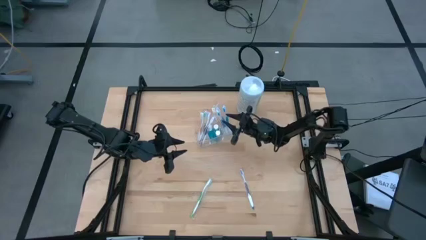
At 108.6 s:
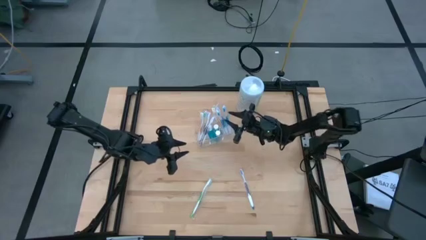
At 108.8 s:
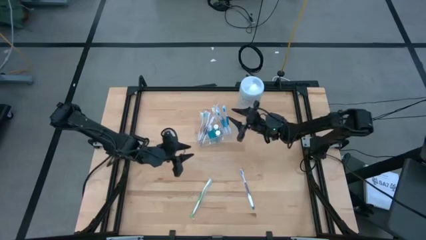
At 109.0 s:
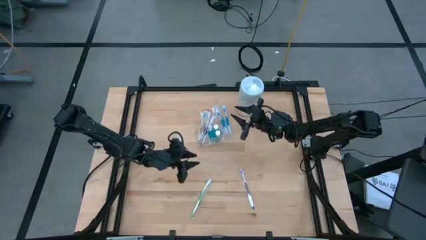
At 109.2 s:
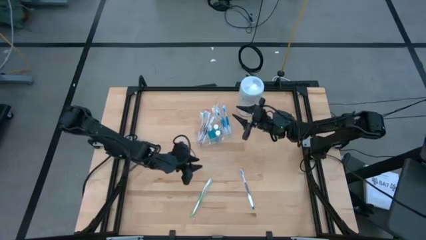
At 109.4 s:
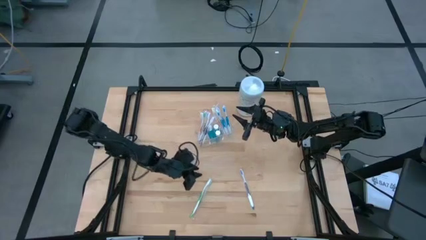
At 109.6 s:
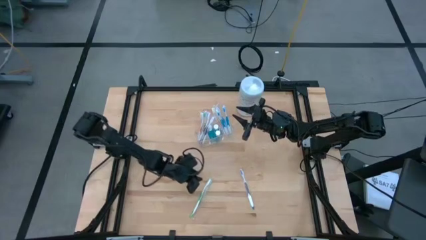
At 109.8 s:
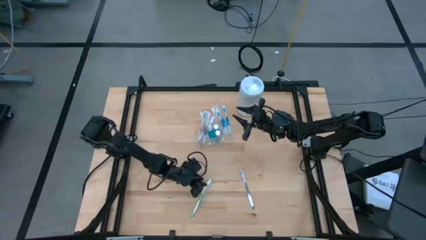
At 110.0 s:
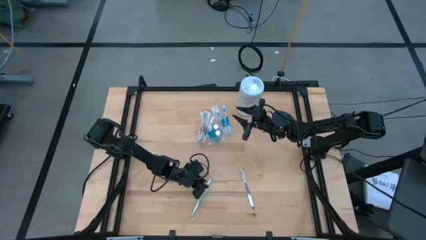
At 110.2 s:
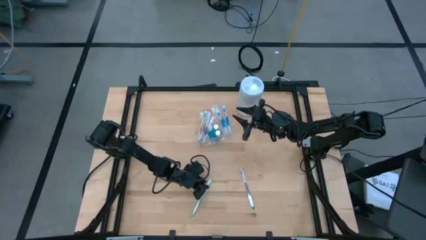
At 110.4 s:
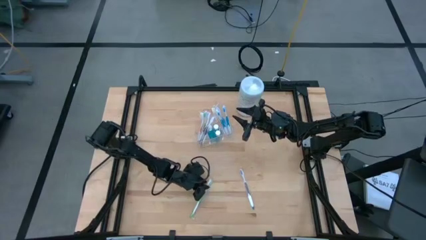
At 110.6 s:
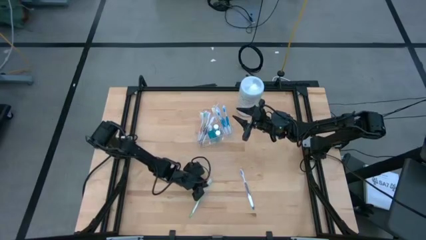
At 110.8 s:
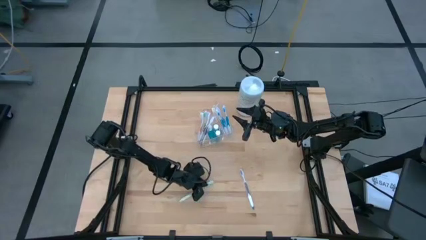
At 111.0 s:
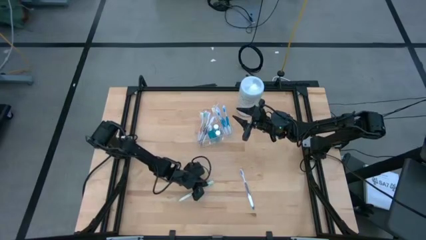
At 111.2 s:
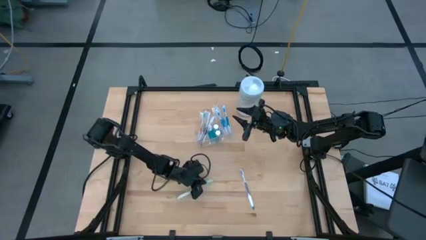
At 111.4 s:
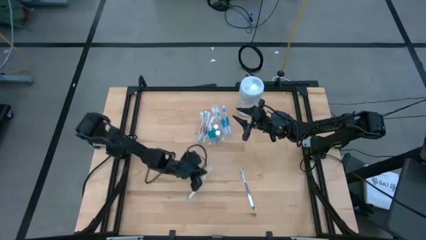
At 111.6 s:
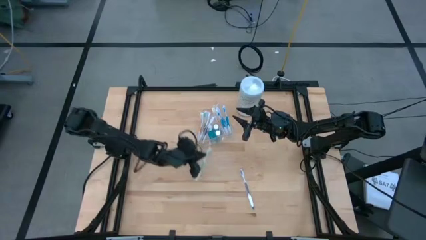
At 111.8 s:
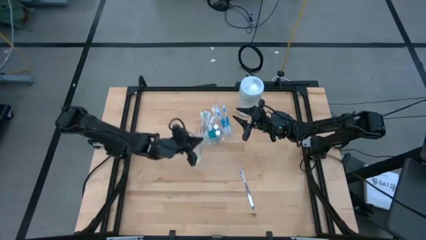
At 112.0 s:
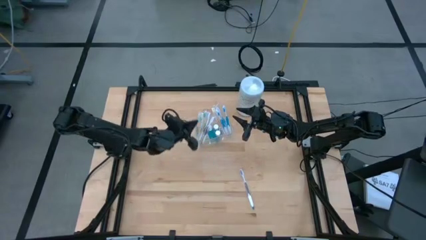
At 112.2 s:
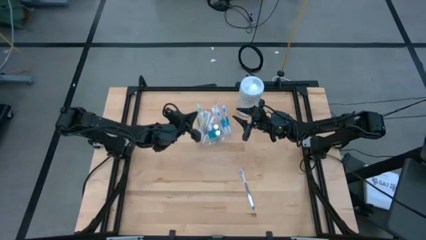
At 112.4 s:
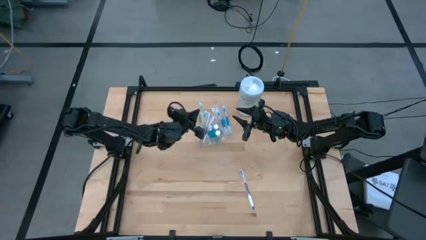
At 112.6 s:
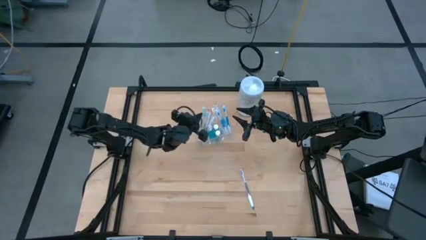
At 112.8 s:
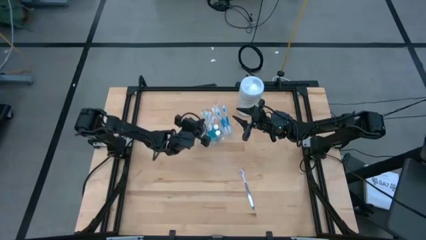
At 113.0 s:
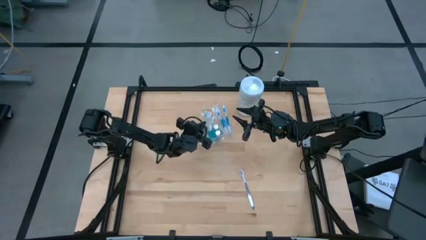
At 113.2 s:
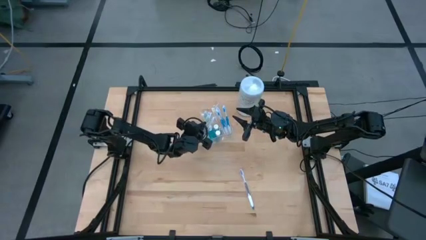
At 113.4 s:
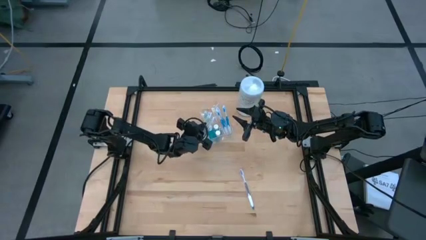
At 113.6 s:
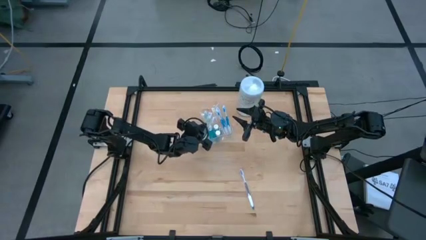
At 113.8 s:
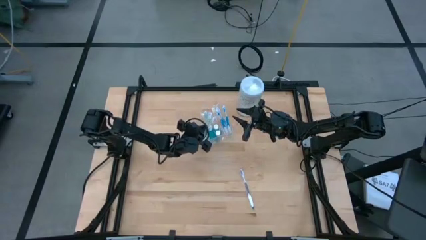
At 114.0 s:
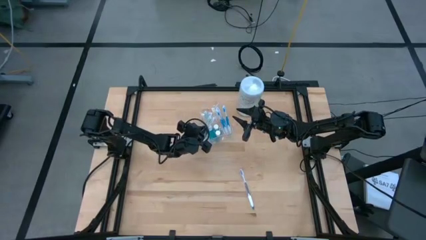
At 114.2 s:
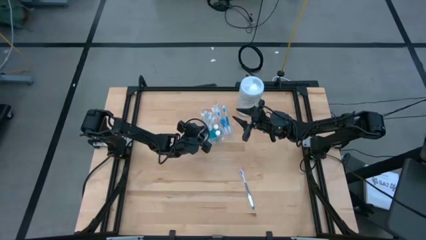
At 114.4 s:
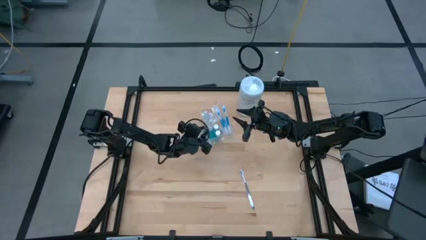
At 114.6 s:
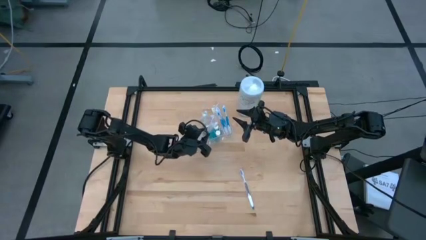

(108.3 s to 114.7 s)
Task: Pick & Place toothbrushing station
Put the green toothbrush into the transparent organizer

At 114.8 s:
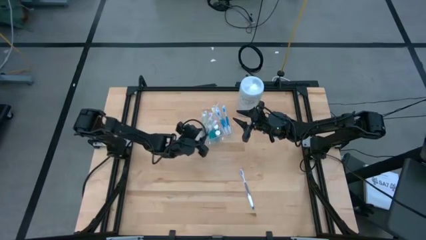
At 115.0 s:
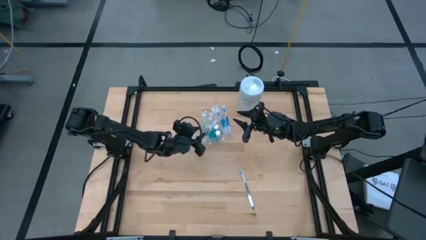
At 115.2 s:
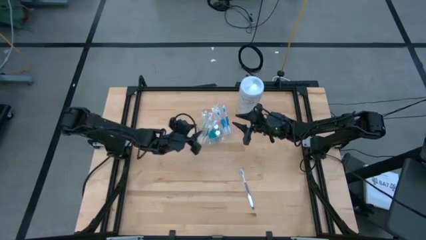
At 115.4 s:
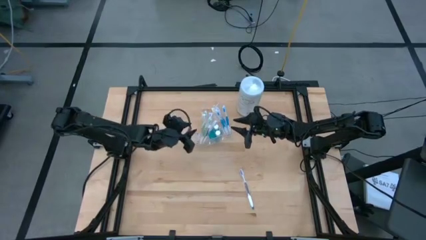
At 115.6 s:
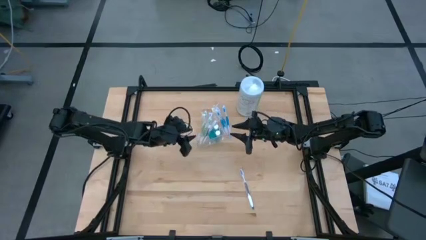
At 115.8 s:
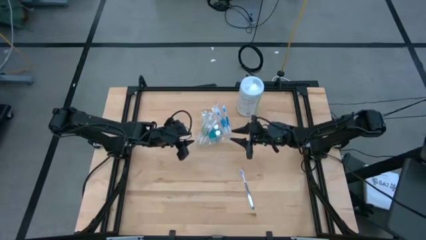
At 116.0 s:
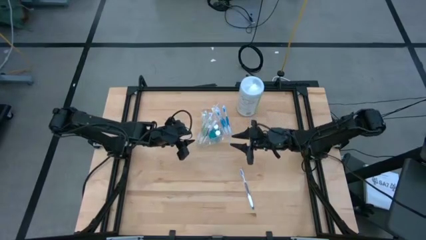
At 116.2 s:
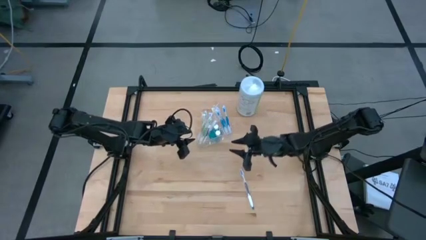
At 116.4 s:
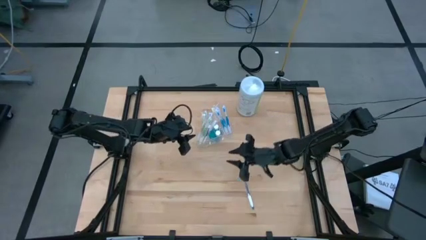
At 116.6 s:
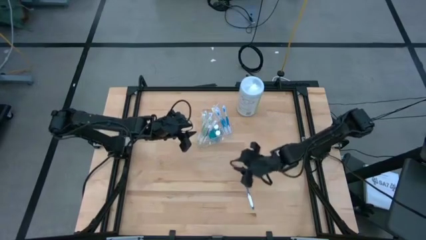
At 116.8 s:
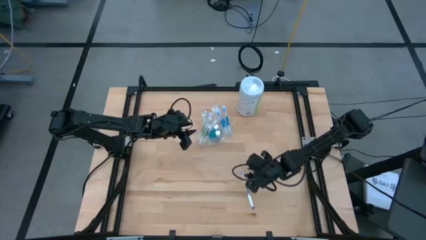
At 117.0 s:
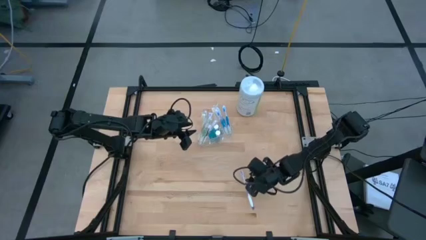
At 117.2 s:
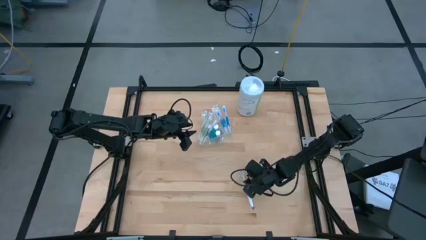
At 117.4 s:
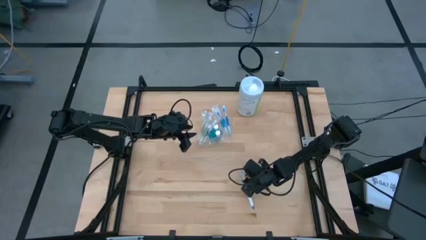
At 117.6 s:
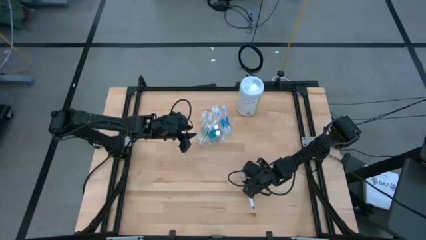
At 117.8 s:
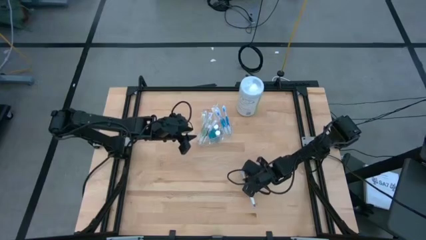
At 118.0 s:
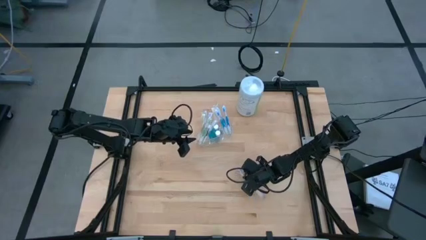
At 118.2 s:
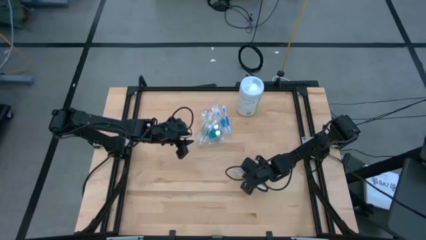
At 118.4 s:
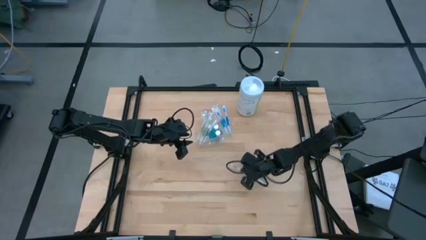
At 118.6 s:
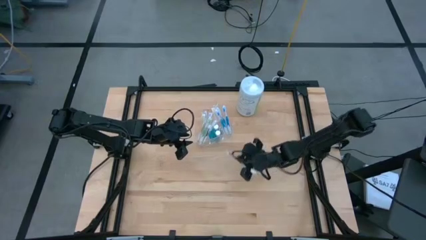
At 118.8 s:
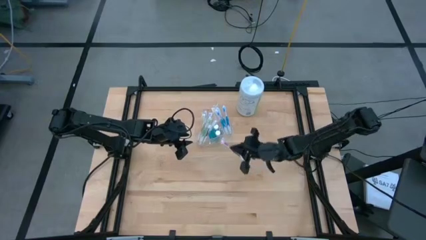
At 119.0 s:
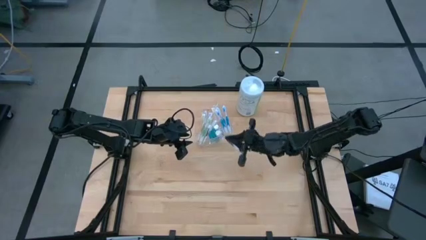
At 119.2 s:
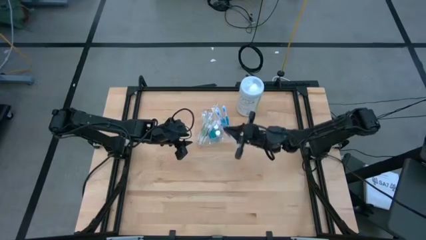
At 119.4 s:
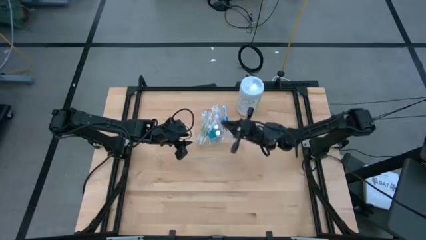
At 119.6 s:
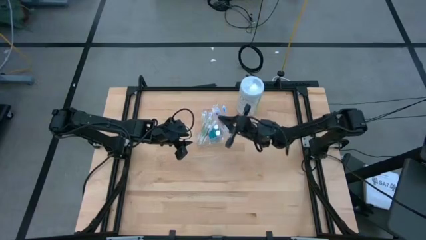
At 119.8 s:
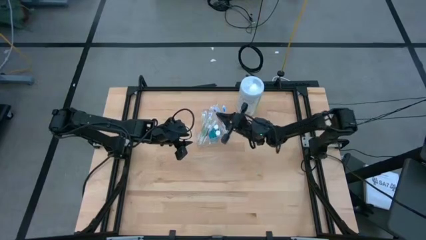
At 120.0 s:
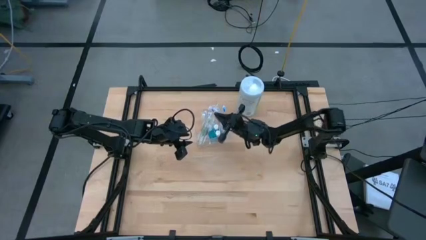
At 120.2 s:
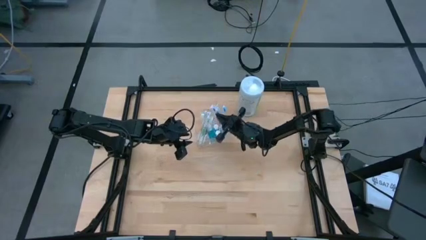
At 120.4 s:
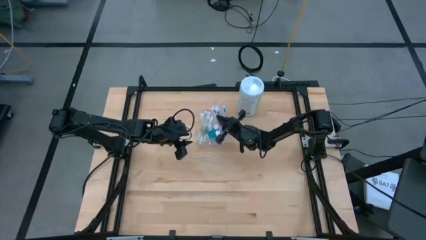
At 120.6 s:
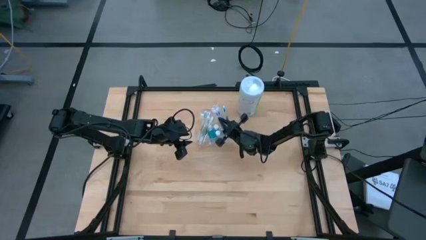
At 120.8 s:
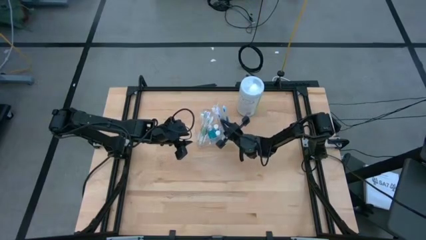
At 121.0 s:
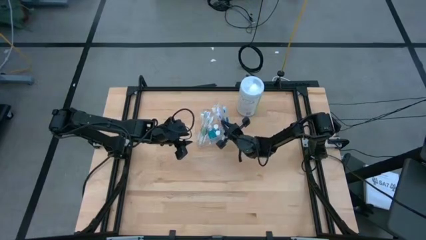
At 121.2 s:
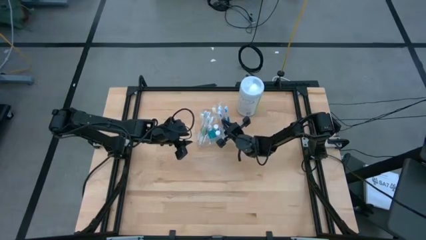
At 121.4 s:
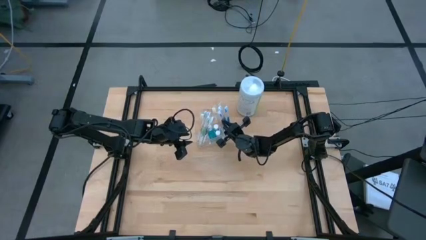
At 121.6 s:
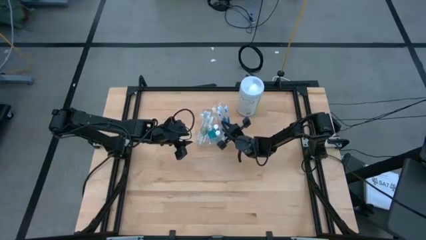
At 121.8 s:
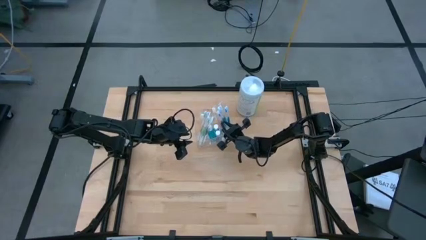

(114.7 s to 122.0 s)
Put the purple toothbrush into the transparent organizer

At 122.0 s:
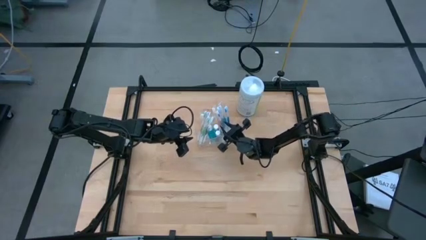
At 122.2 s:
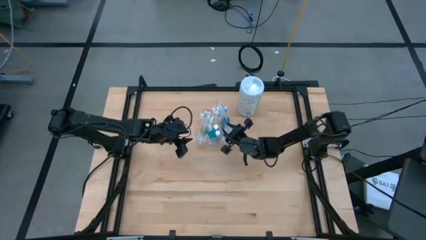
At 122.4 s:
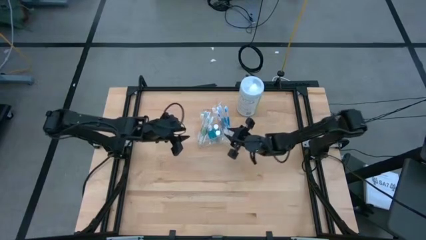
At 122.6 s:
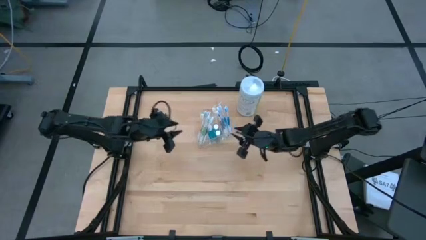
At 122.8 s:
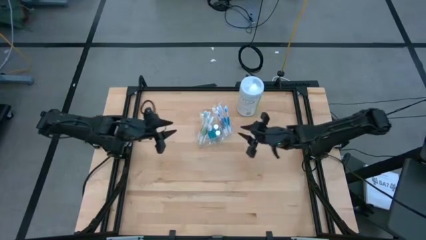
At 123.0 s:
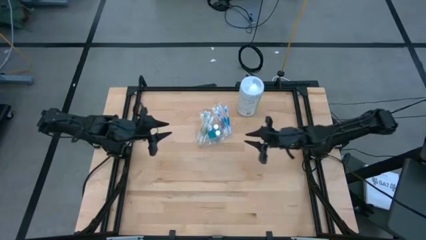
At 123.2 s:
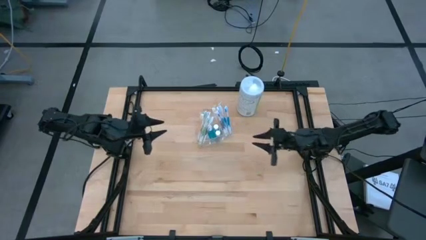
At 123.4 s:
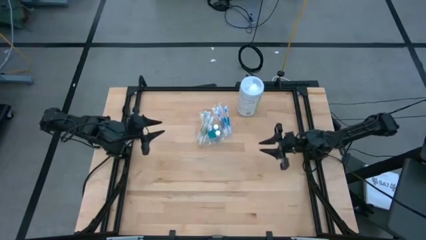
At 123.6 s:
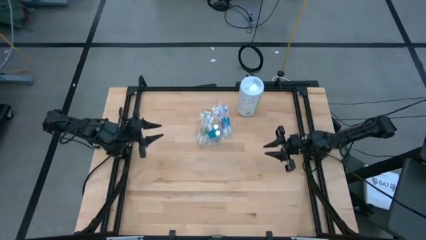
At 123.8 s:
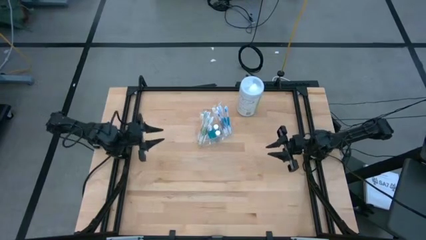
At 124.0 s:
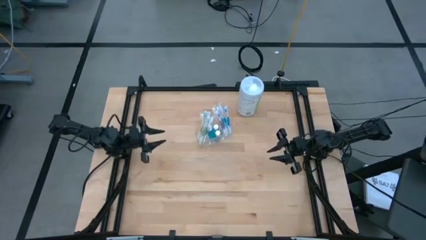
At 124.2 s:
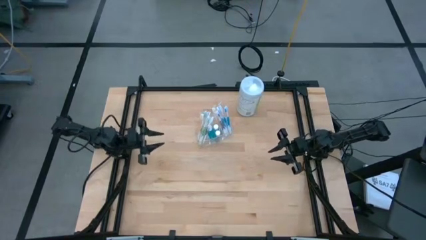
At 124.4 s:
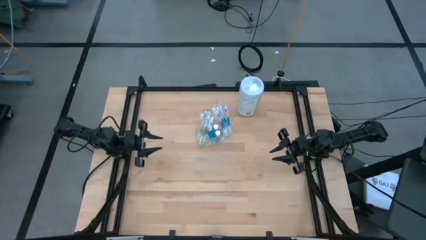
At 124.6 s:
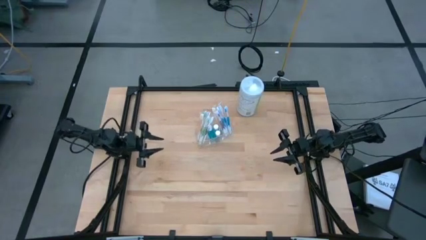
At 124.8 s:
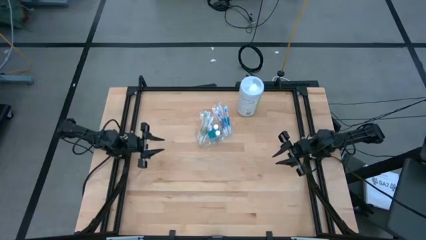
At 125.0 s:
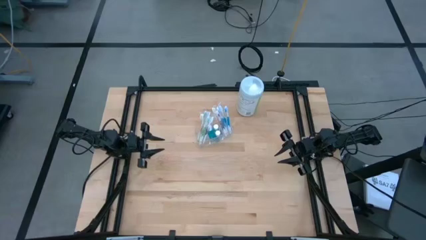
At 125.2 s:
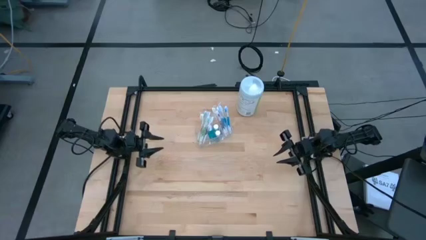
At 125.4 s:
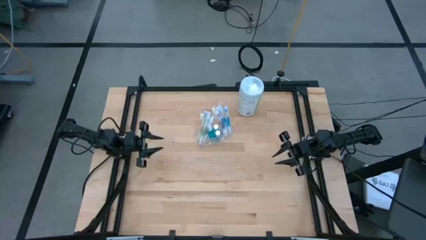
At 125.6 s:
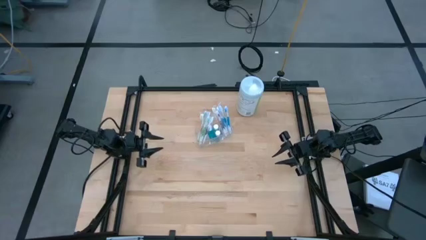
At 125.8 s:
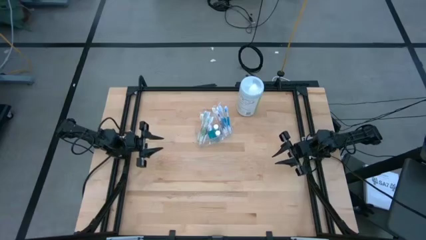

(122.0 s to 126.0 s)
Return to Home Position
